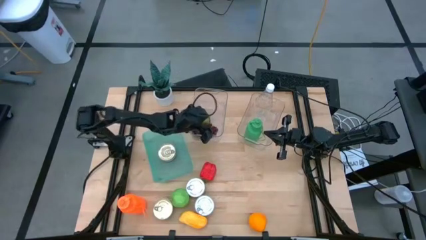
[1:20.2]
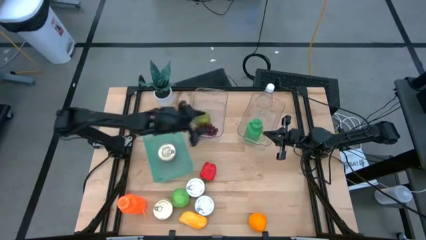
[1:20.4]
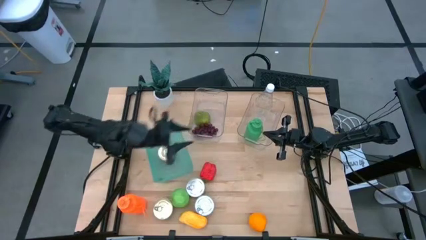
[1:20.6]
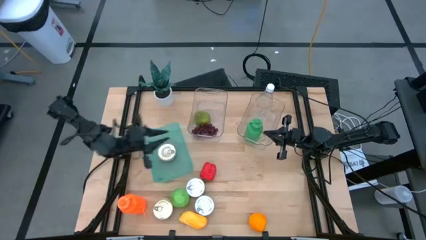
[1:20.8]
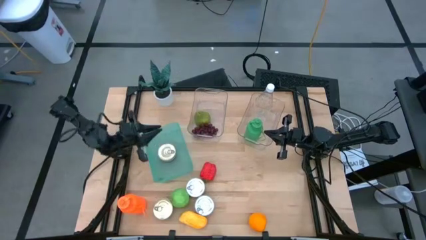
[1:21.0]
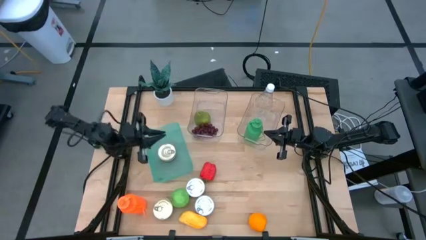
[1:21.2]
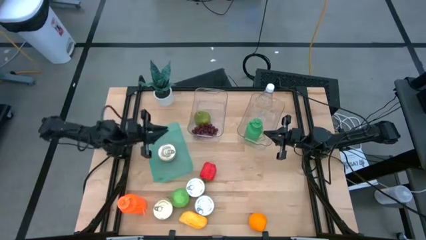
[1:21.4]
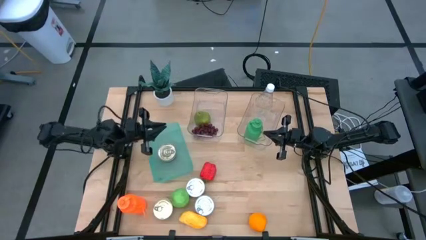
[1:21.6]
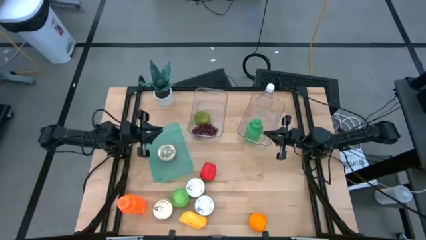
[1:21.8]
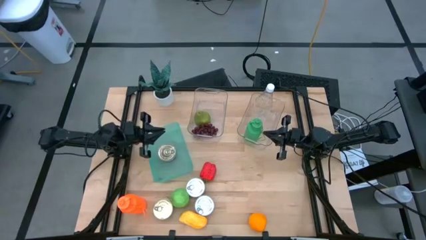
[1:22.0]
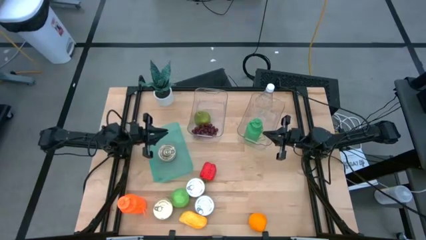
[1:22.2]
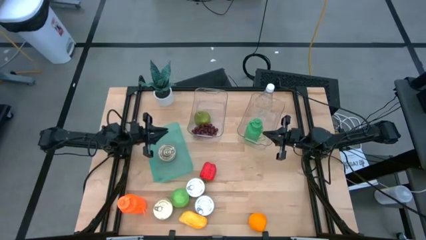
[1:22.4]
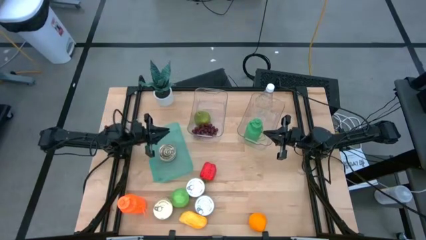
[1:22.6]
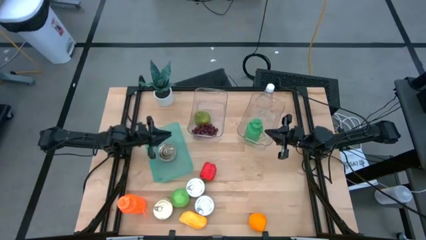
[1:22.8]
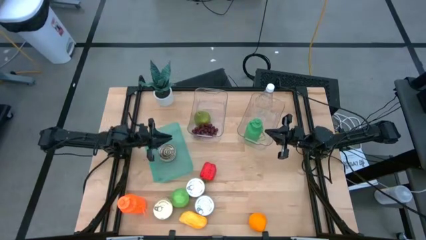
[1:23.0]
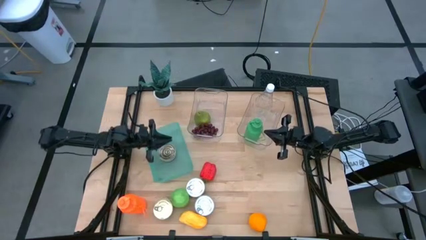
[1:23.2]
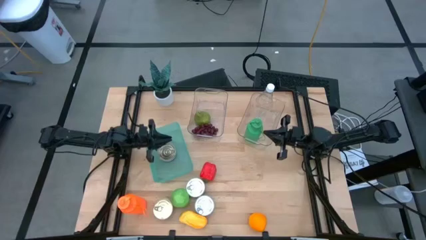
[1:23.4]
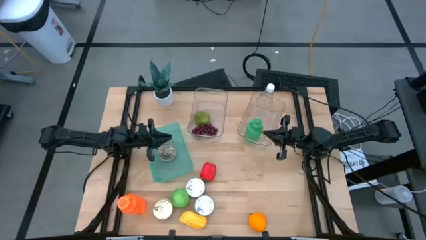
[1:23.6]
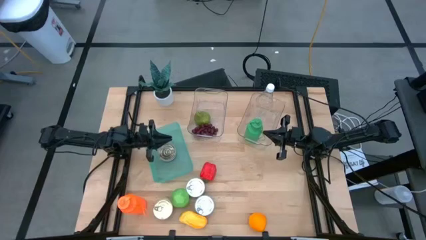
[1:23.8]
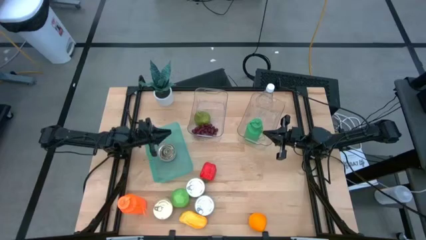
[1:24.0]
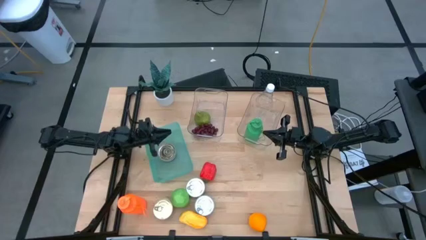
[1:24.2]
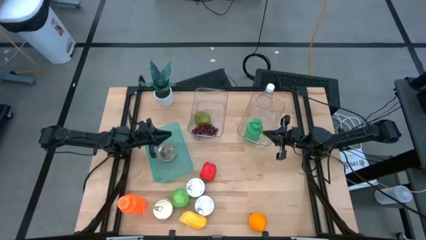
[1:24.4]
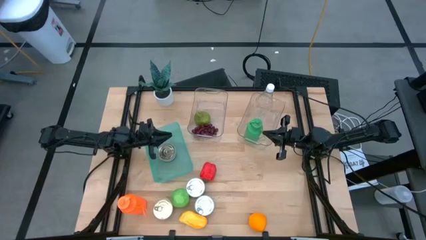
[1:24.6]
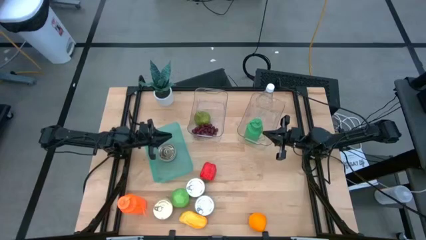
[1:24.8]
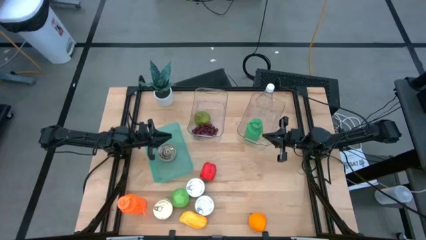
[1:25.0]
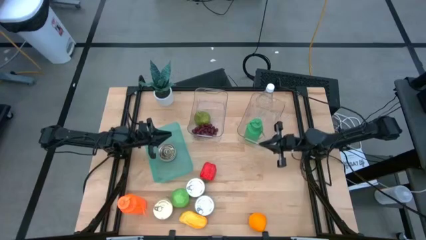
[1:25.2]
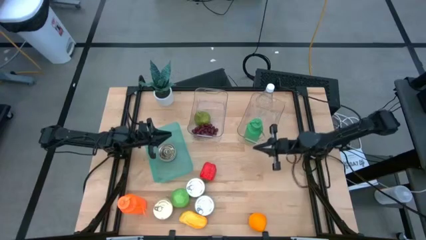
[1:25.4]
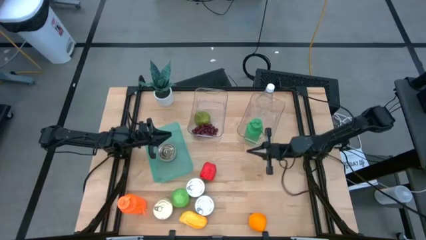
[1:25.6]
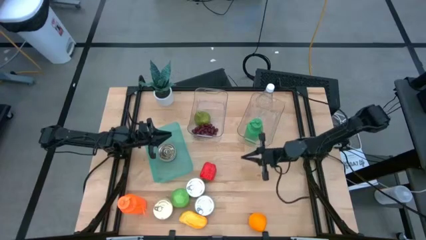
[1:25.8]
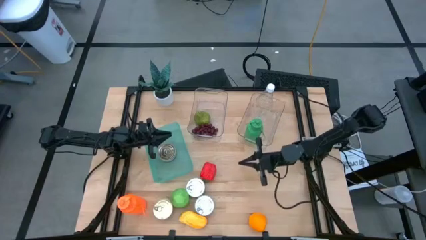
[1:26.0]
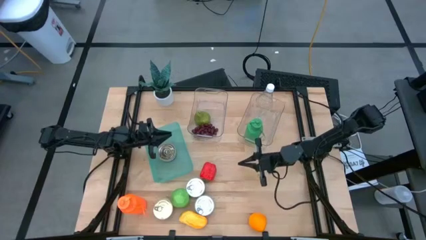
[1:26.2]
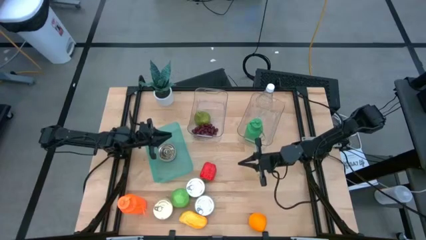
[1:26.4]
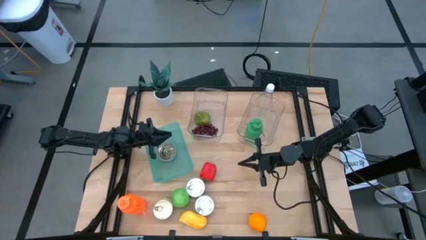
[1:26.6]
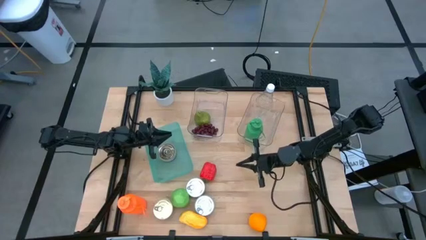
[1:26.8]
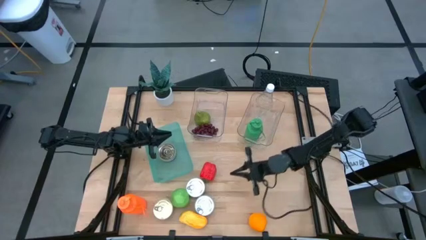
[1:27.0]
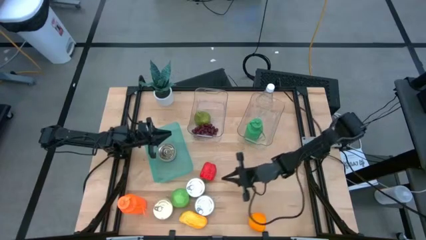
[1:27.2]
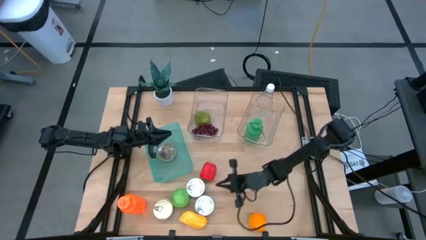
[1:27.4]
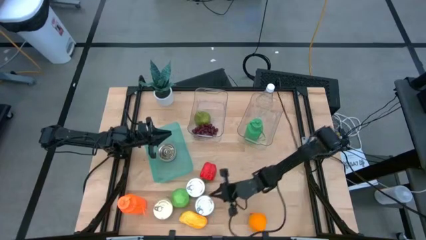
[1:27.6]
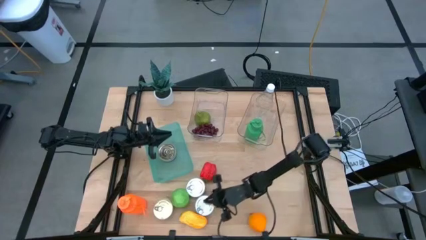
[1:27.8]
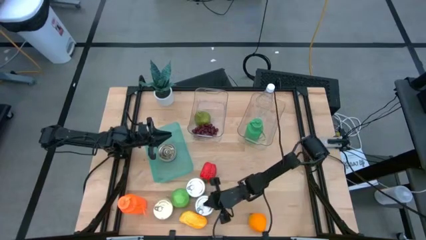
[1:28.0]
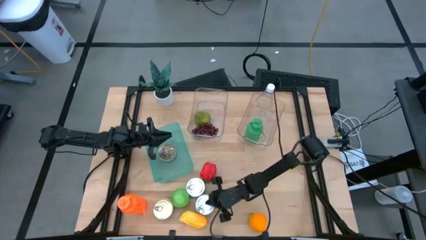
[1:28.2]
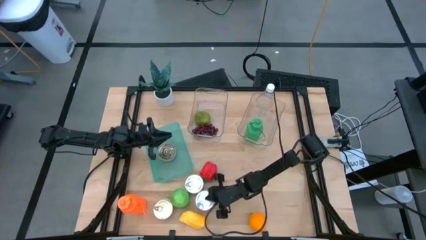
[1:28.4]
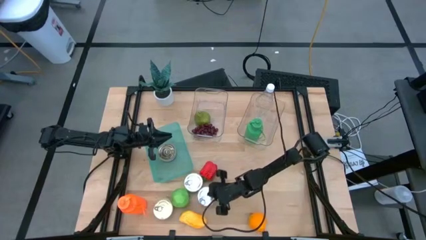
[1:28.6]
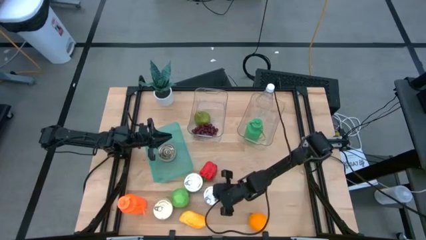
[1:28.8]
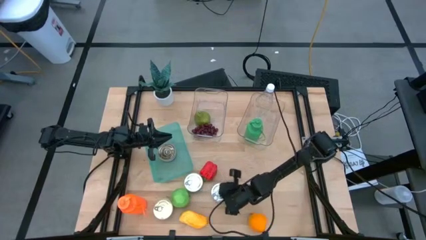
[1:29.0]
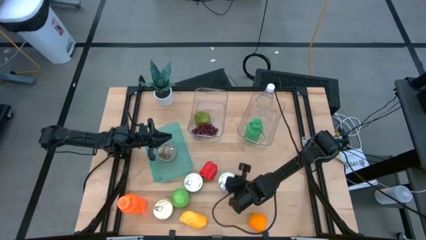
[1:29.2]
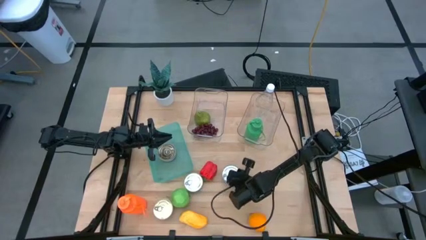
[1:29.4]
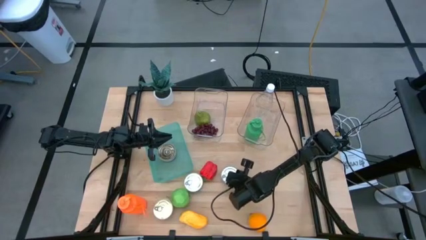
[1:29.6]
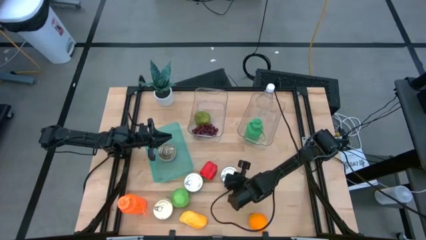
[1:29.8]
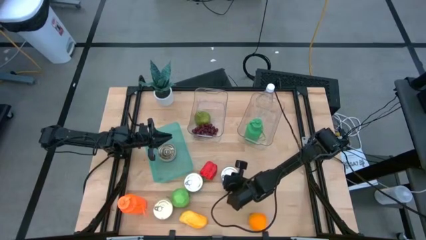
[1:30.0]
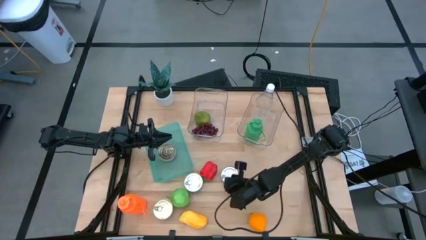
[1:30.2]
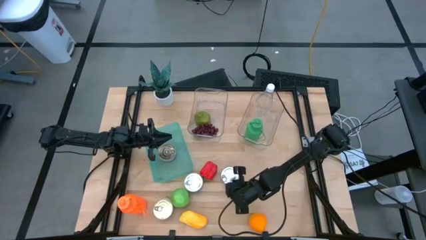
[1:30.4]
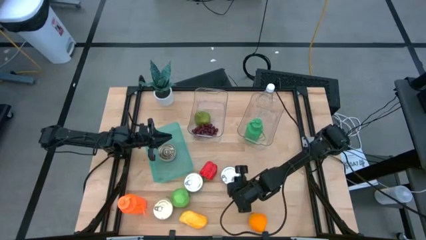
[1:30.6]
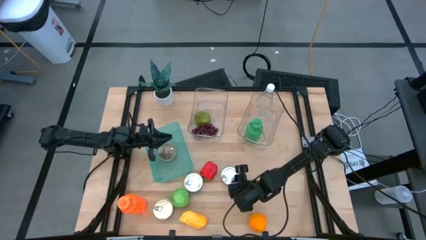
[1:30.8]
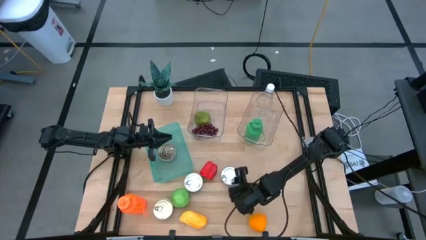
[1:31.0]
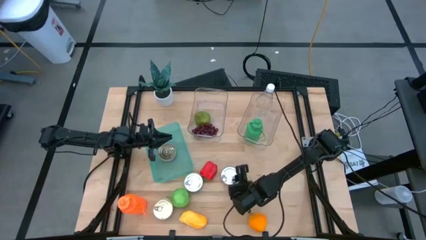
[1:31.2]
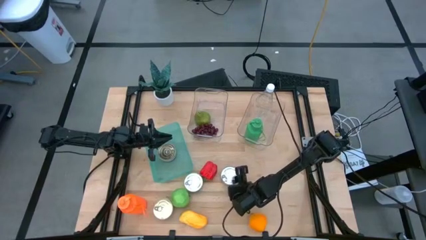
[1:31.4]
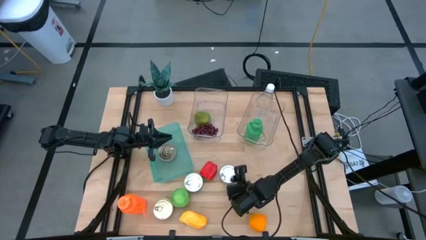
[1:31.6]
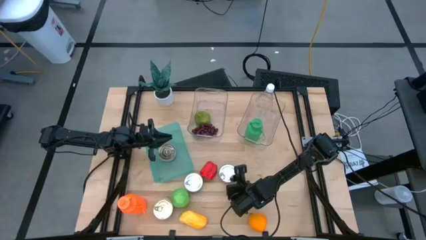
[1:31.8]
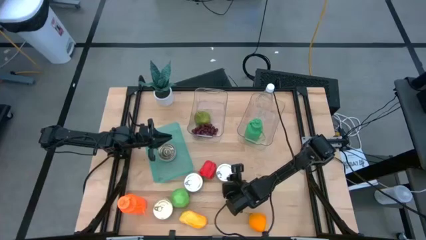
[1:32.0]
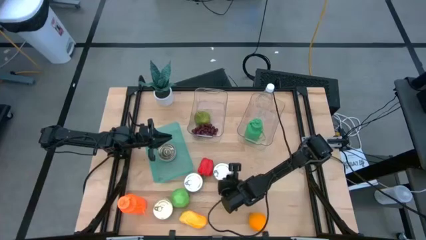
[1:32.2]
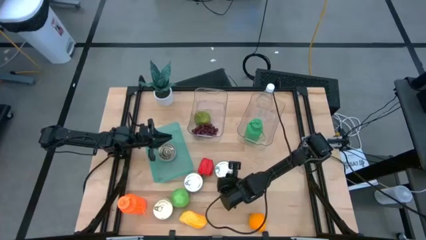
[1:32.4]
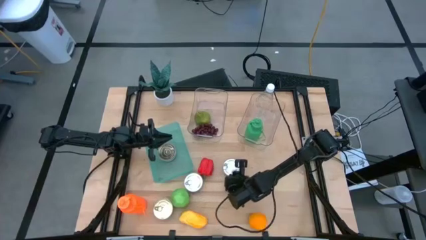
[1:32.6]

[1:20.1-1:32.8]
Task: Pick & Place Food Item
Put the bottom green tuna can into the green bin
